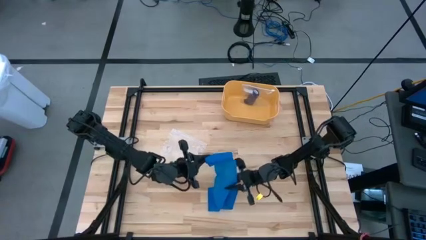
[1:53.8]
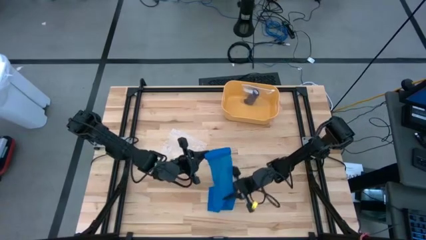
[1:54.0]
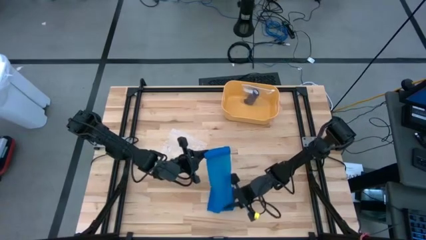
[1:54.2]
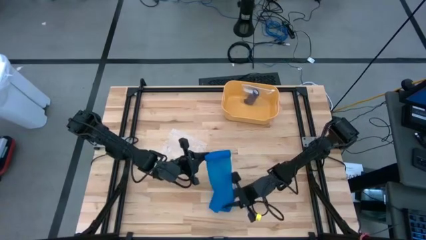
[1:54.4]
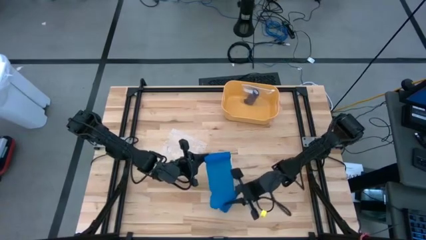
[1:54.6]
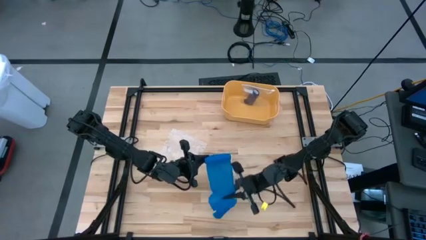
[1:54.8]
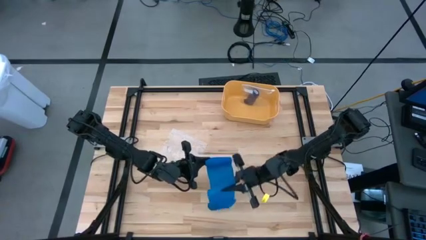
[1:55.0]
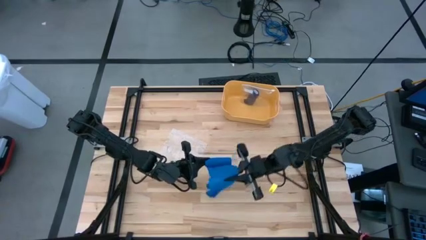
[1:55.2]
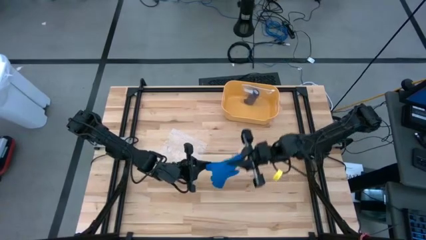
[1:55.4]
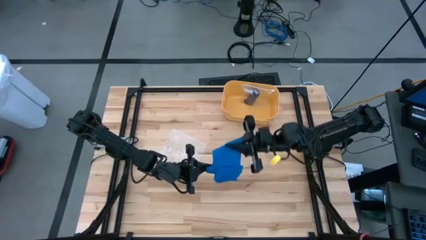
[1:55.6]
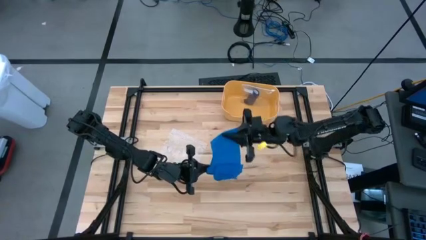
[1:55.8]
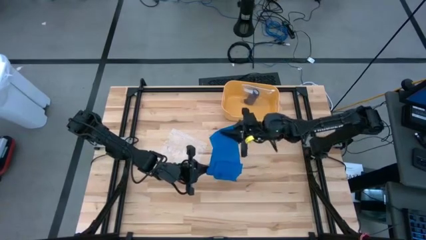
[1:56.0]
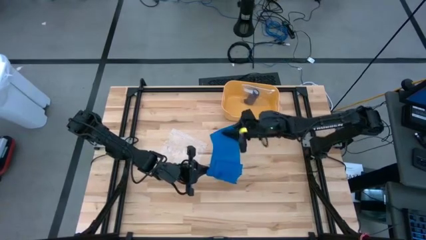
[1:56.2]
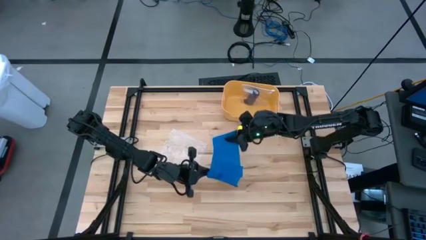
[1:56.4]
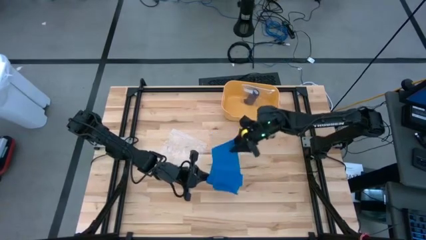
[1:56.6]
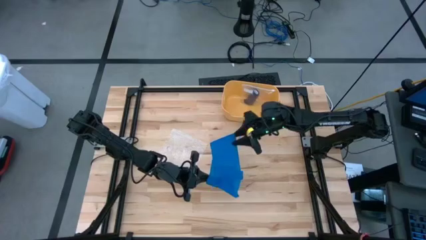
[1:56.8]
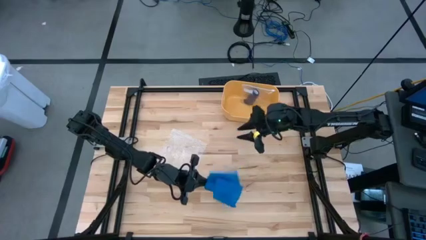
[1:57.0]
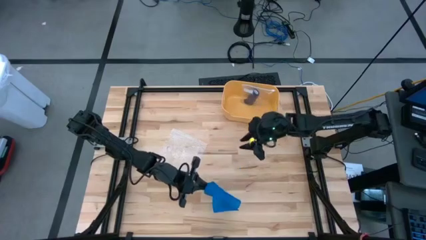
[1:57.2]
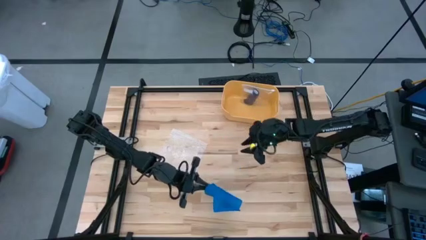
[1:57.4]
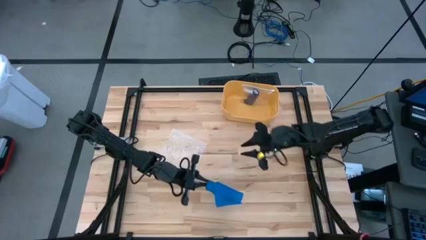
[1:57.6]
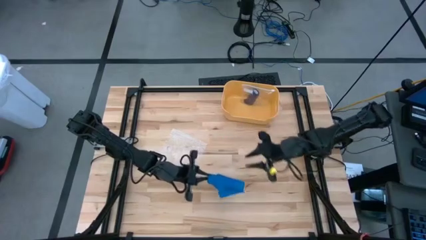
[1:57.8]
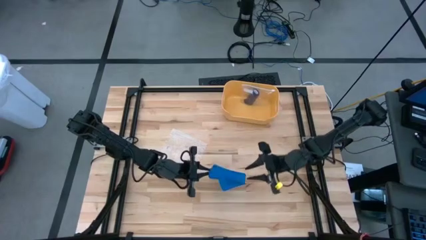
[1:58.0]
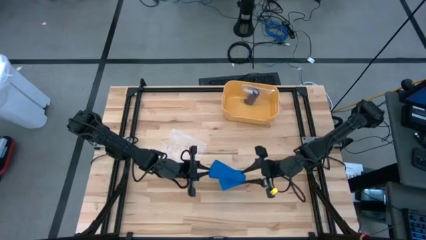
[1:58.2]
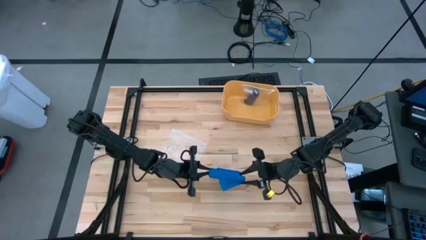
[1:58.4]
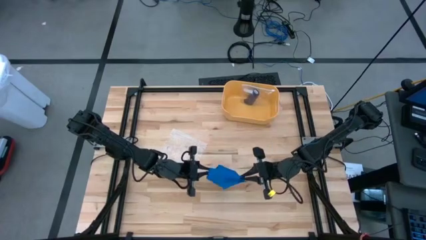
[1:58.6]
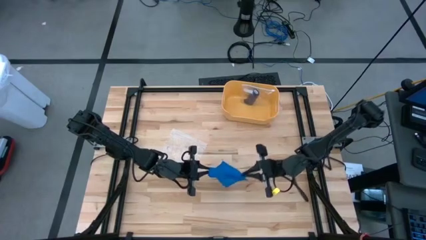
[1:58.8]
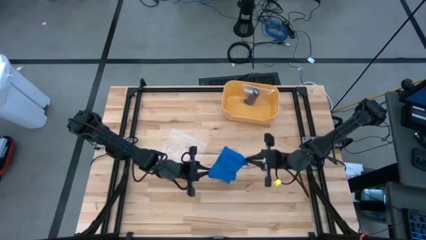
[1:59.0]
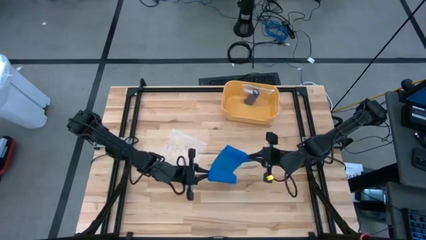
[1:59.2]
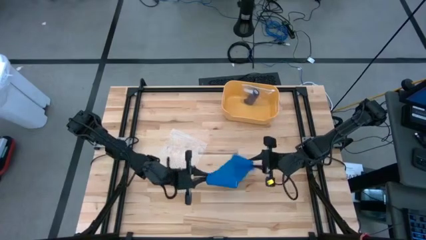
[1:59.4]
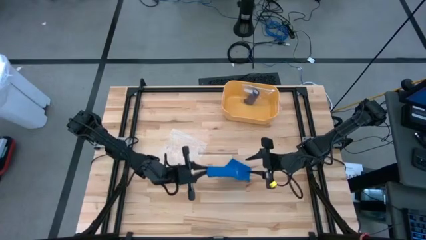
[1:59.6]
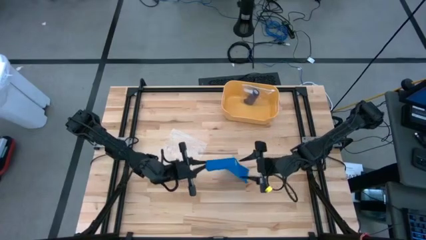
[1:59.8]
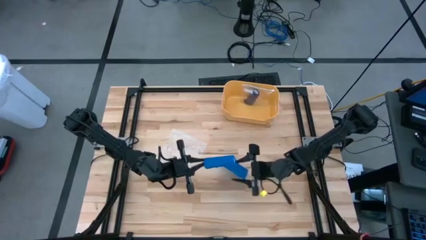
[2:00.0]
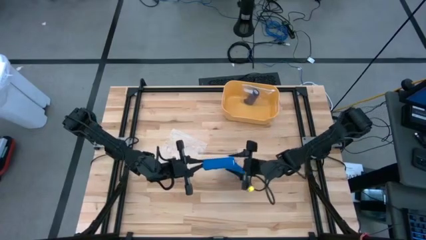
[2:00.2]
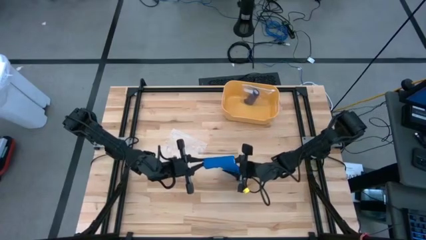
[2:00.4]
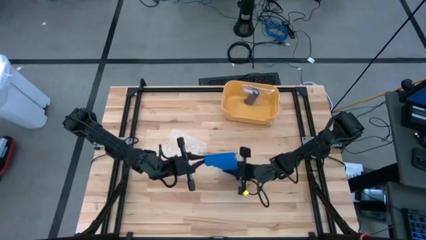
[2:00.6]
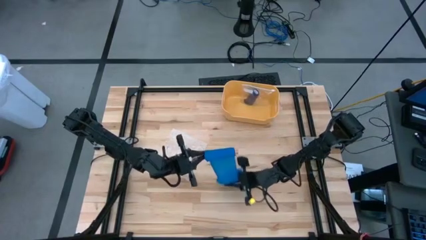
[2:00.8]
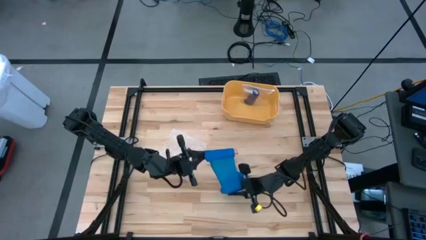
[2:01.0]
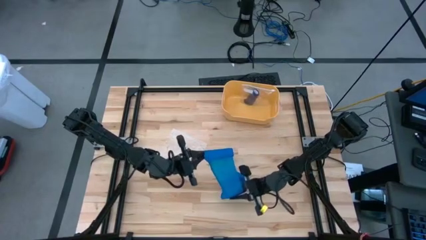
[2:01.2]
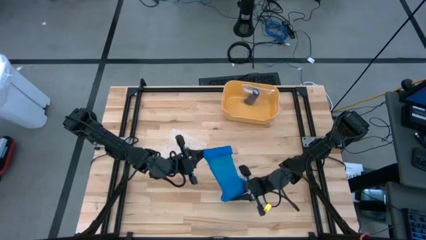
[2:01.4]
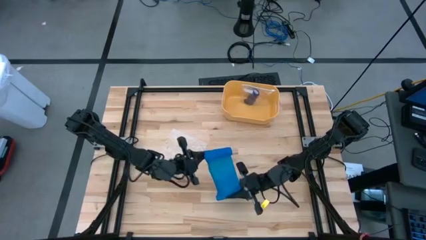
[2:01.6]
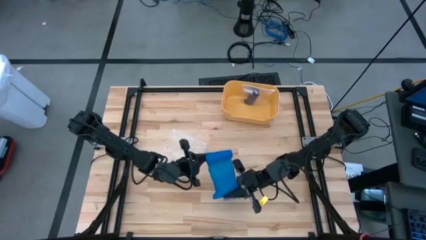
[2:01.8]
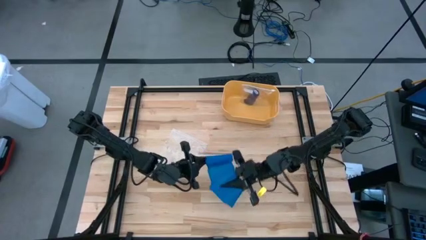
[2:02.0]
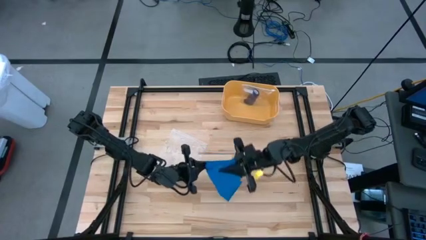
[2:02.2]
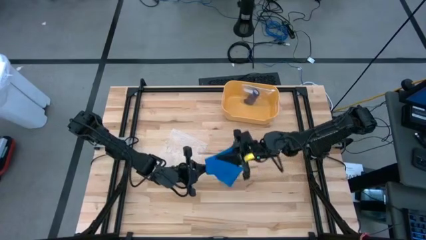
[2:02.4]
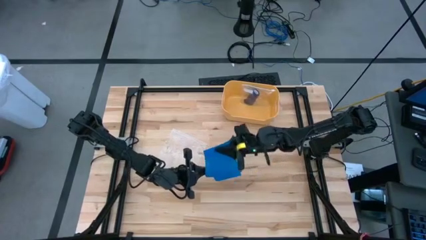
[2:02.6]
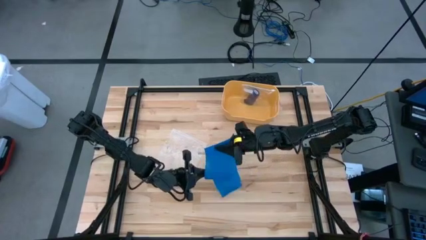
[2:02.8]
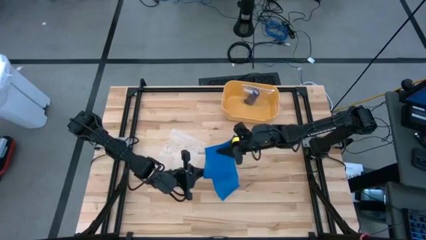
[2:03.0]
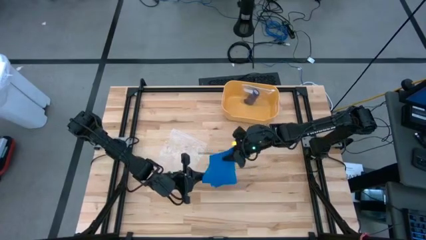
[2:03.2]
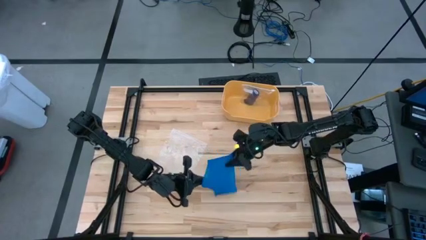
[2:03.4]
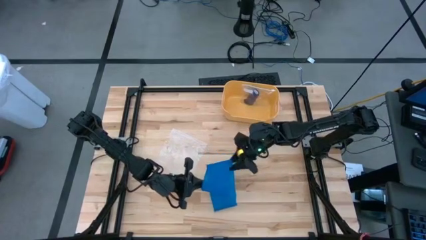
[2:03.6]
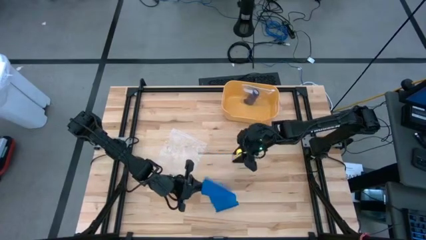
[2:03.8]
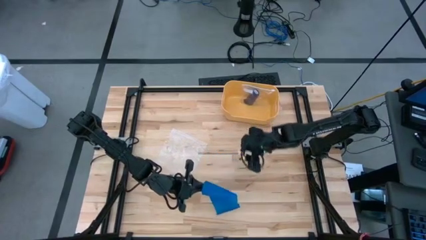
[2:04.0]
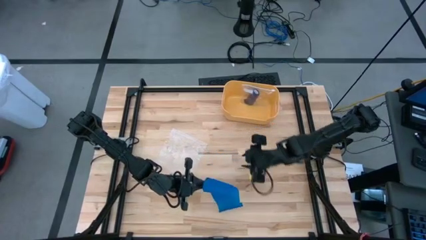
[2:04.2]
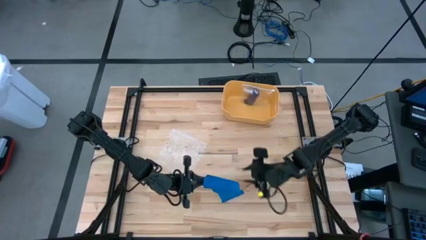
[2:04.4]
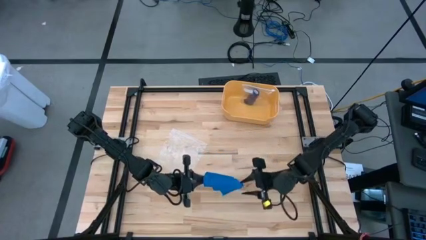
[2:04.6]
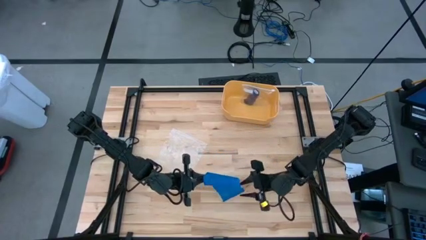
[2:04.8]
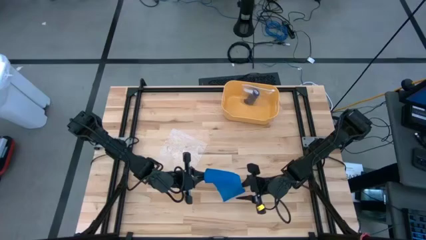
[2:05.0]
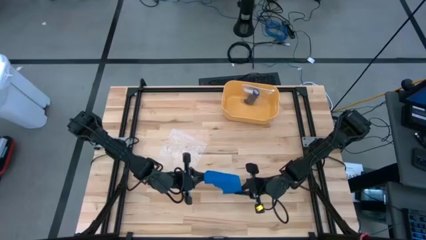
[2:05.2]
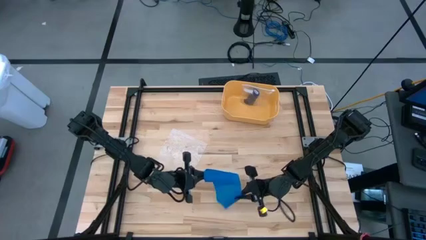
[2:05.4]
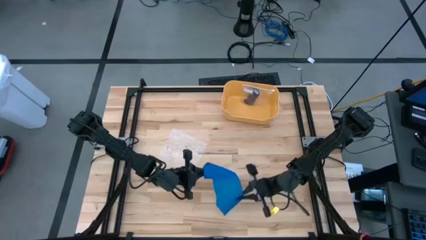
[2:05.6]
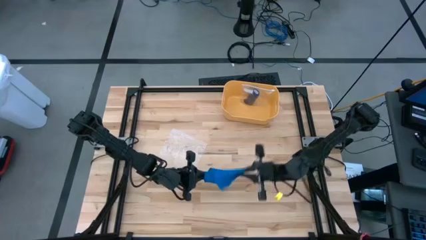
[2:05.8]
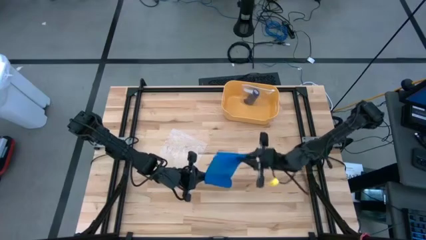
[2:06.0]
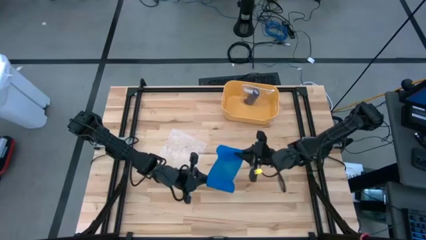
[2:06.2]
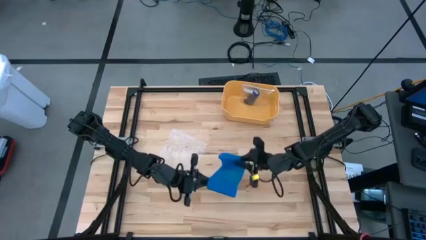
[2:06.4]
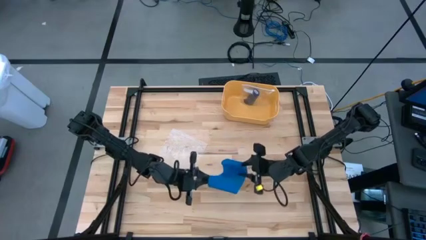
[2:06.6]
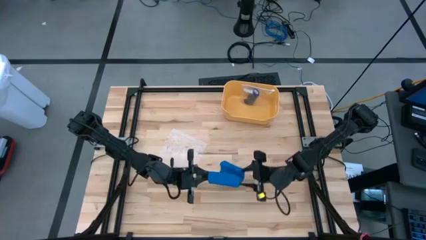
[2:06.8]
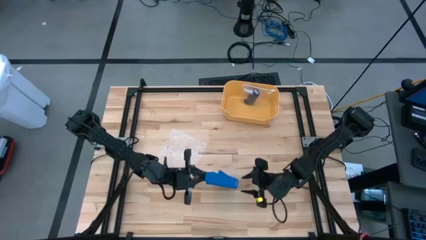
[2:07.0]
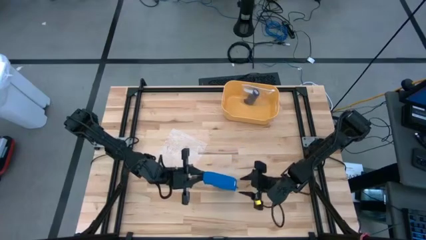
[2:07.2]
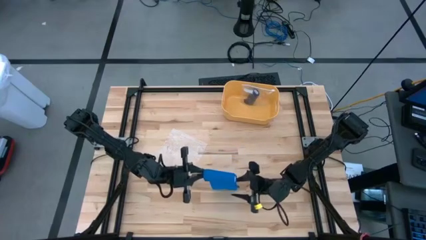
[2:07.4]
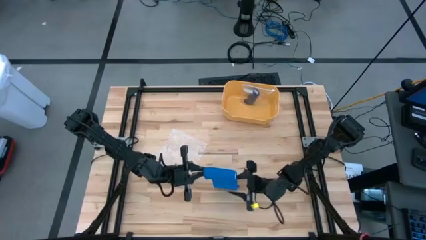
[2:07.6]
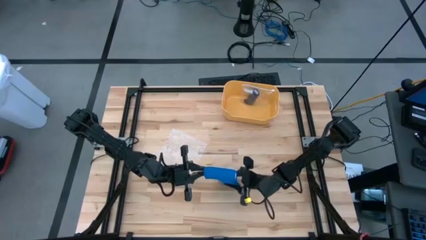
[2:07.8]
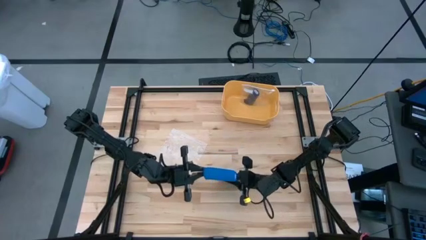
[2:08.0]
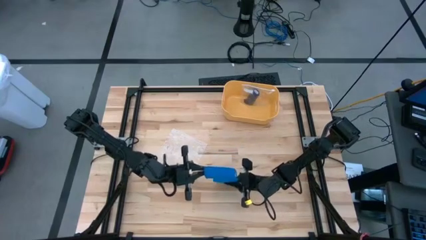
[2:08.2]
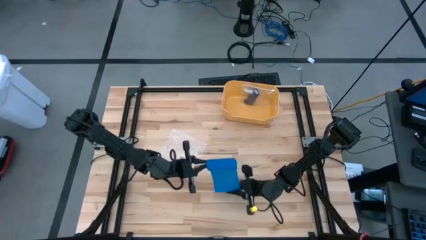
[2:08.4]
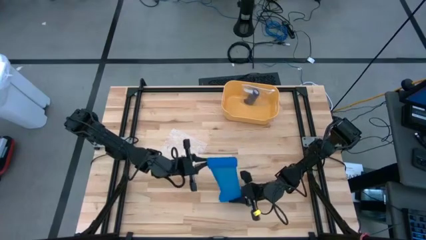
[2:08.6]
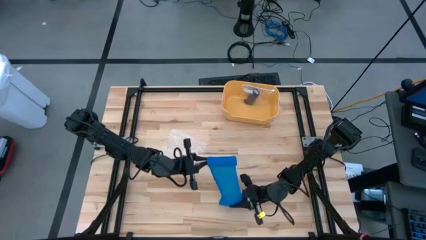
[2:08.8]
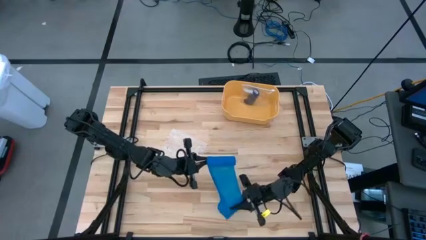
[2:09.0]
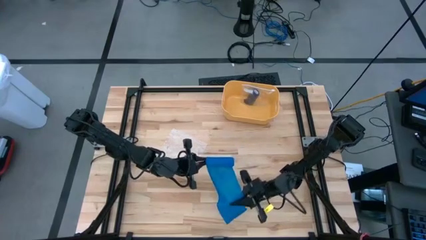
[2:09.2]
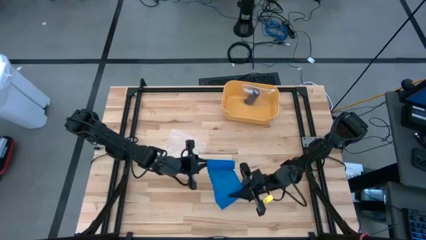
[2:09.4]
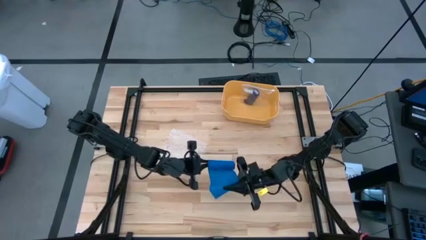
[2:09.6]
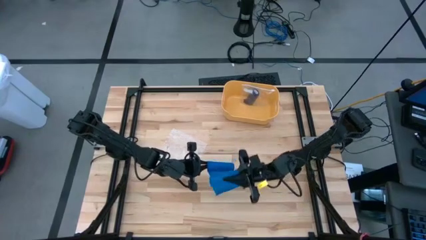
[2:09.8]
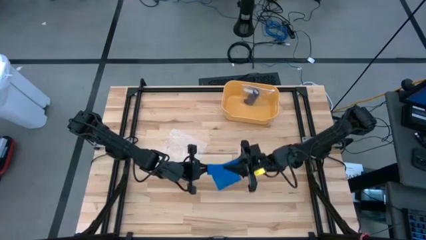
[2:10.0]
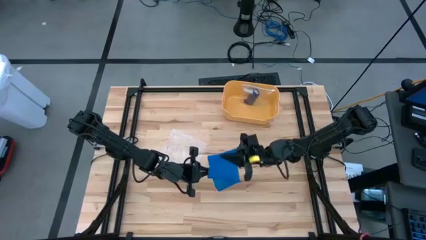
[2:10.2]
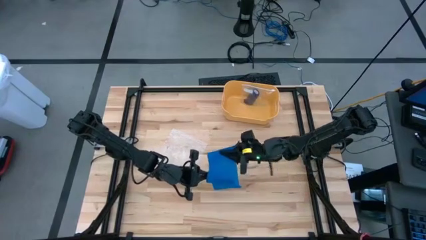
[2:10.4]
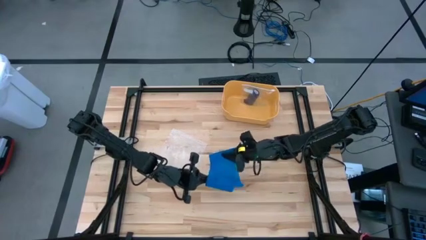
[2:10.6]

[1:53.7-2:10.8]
Task: Roll bandage
Roll the blue bandage

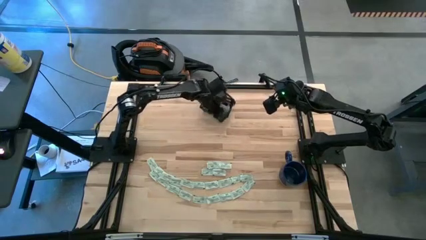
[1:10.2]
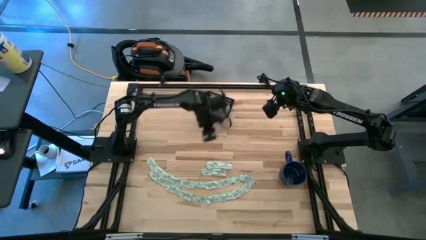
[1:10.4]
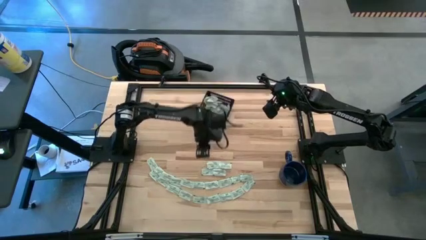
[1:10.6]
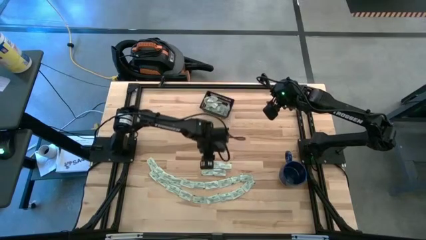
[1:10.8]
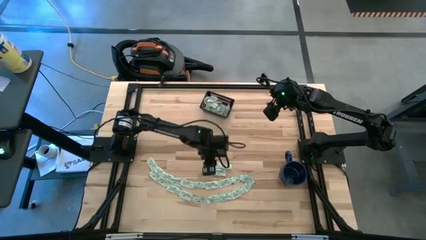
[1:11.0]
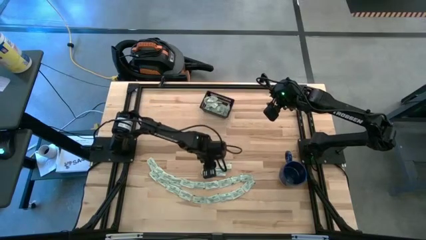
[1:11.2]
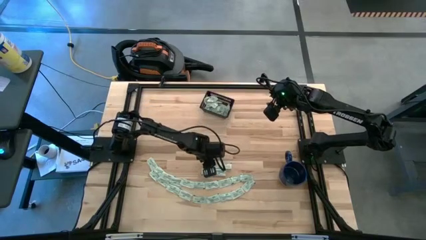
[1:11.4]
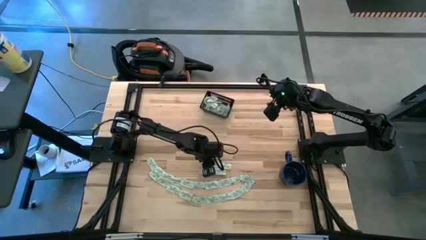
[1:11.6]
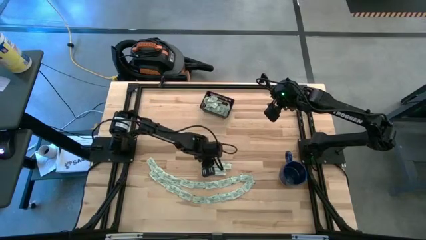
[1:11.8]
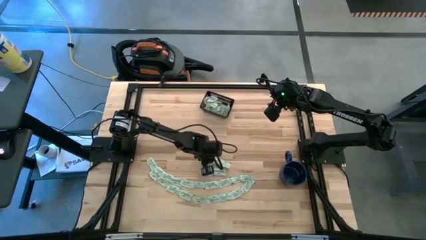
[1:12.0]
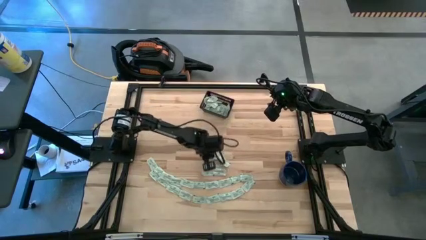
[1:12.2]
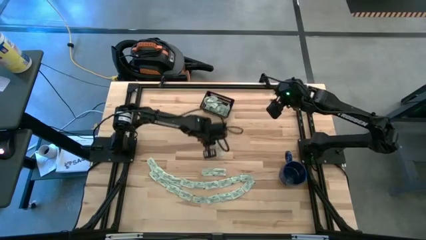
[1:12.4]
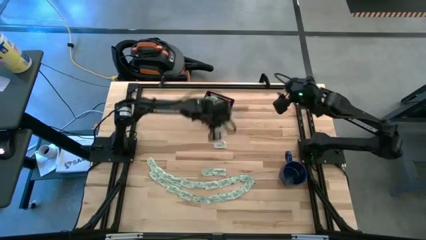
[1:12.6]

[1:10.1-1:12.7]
Task: Pick and place Stevia / Truvia into bins
Put the stevia packet into the black bin
